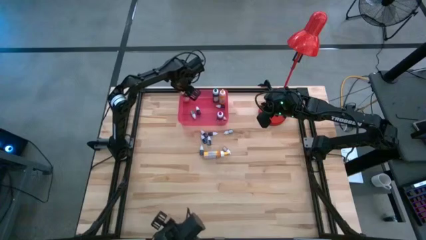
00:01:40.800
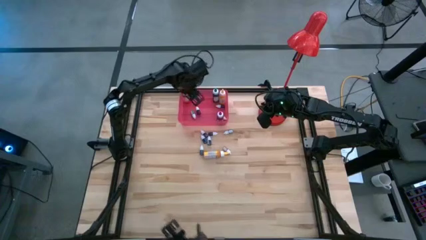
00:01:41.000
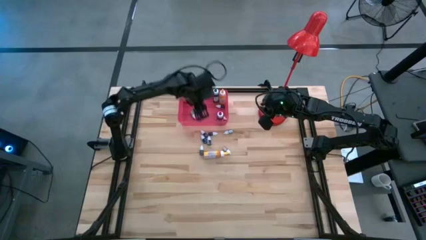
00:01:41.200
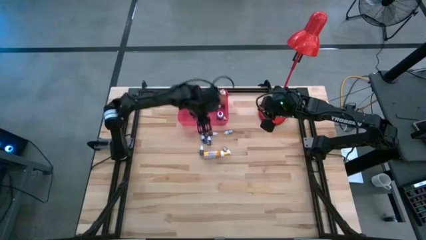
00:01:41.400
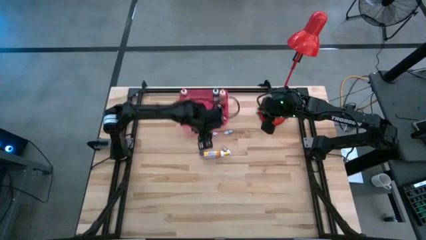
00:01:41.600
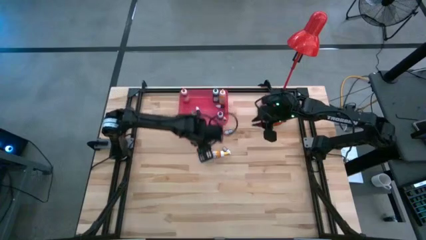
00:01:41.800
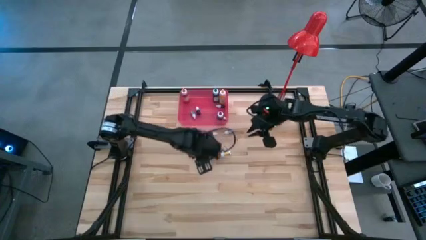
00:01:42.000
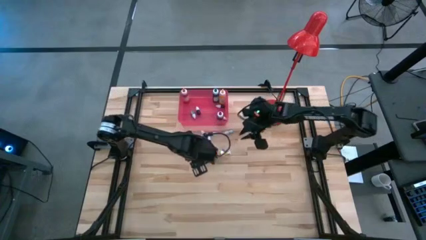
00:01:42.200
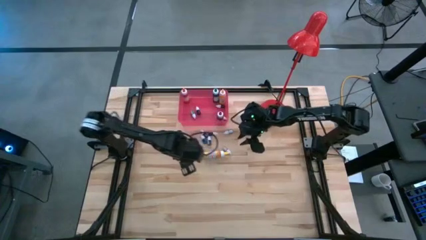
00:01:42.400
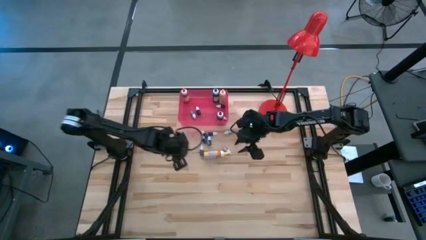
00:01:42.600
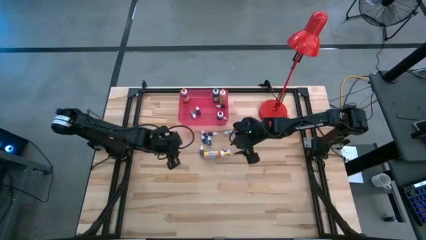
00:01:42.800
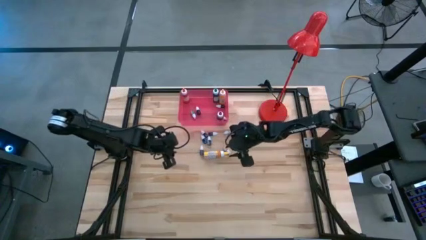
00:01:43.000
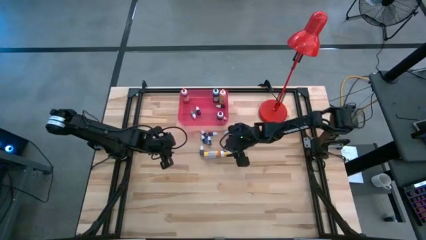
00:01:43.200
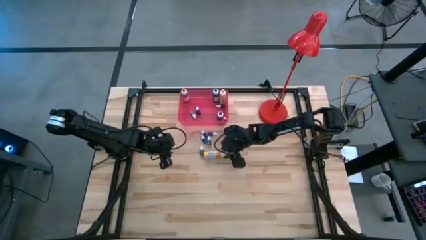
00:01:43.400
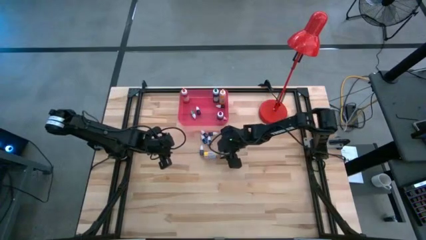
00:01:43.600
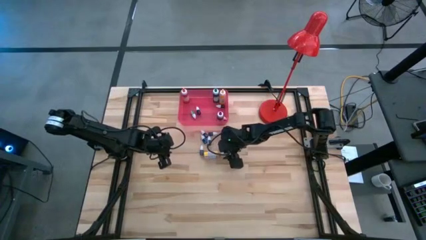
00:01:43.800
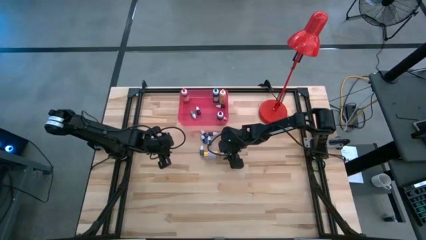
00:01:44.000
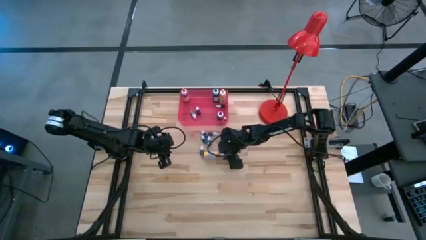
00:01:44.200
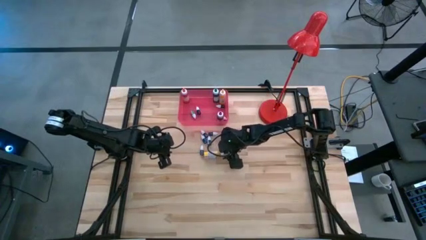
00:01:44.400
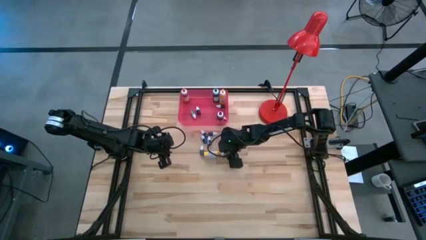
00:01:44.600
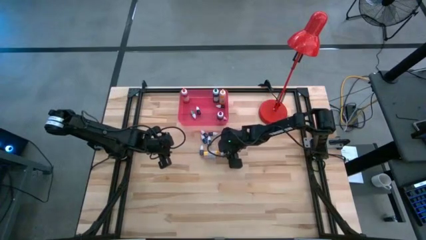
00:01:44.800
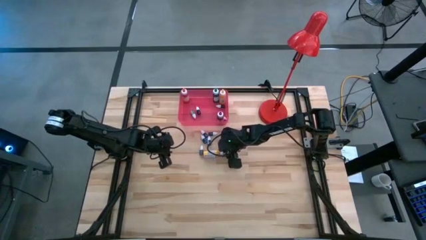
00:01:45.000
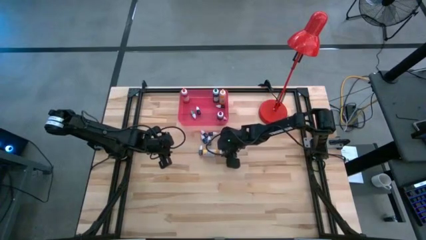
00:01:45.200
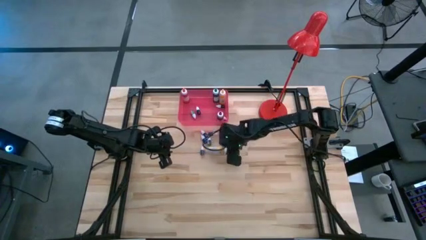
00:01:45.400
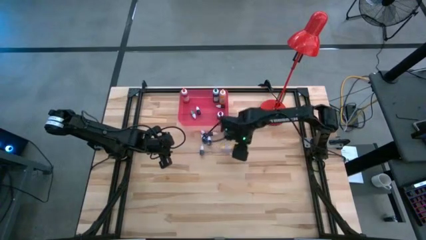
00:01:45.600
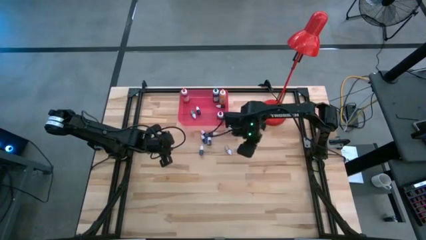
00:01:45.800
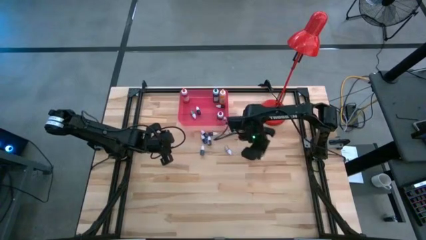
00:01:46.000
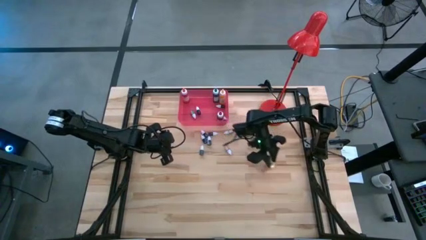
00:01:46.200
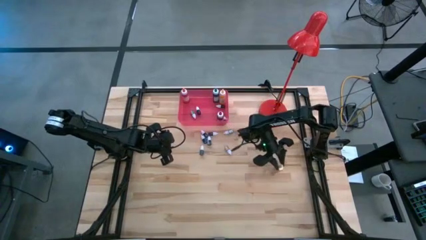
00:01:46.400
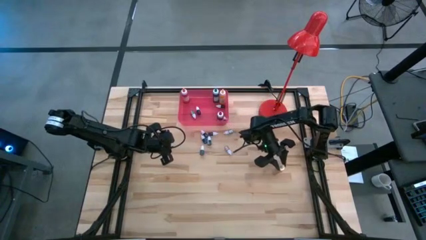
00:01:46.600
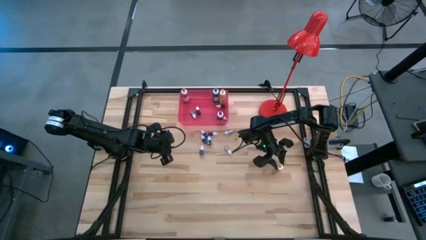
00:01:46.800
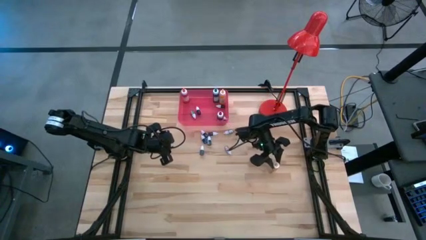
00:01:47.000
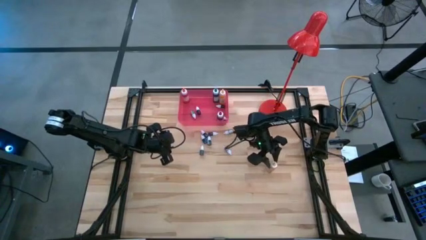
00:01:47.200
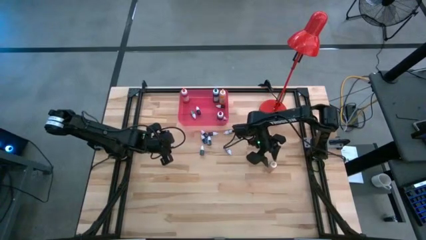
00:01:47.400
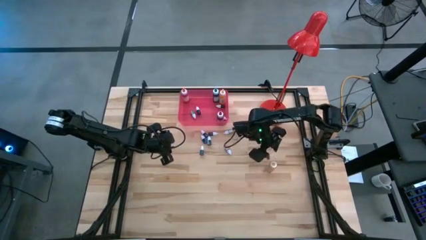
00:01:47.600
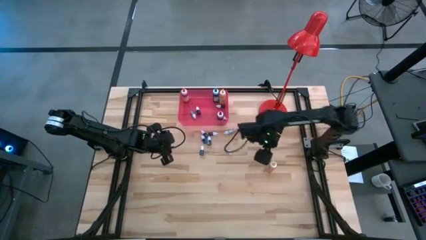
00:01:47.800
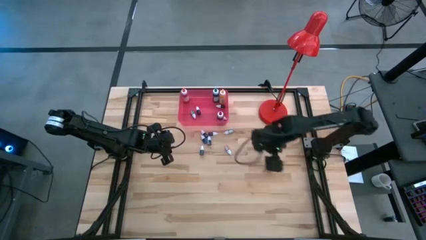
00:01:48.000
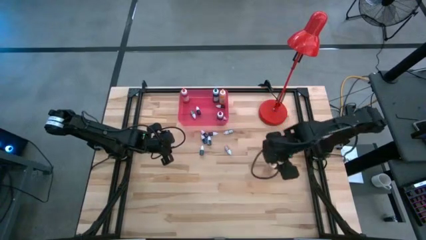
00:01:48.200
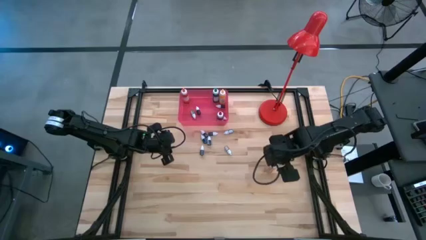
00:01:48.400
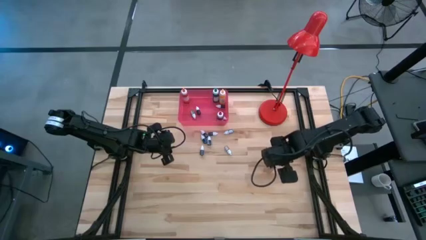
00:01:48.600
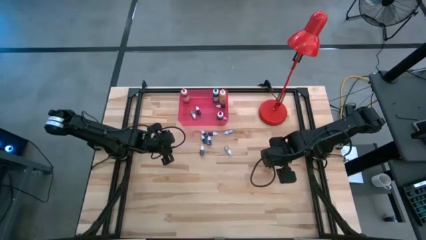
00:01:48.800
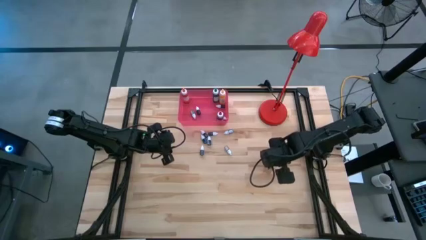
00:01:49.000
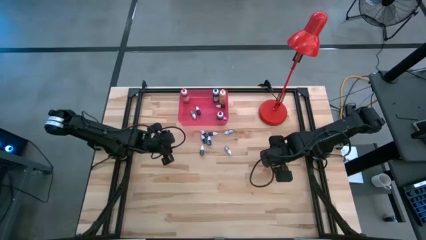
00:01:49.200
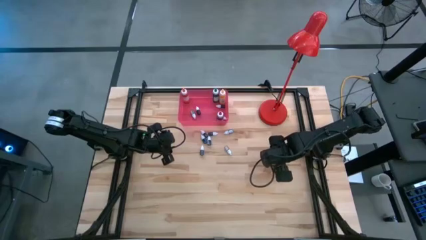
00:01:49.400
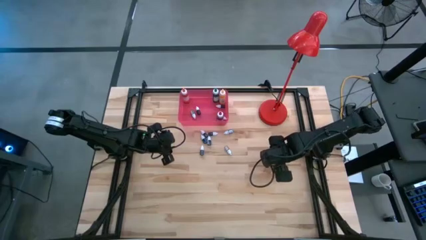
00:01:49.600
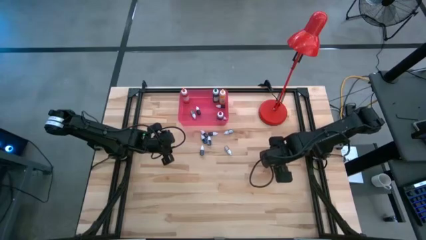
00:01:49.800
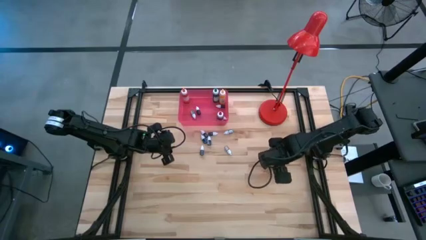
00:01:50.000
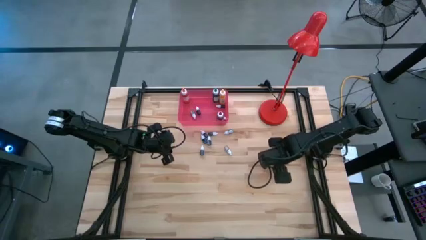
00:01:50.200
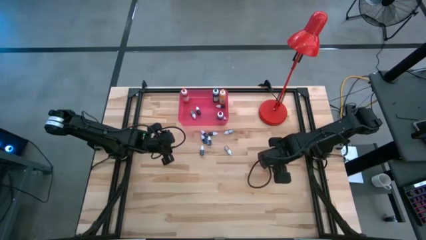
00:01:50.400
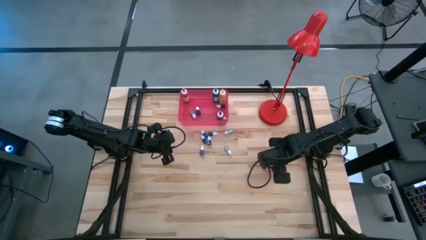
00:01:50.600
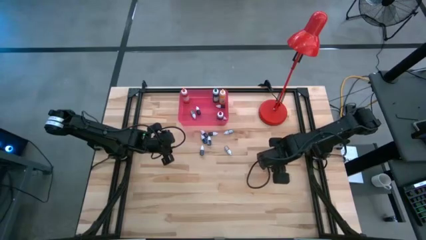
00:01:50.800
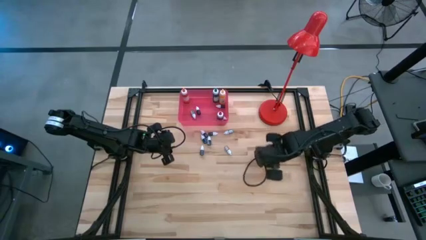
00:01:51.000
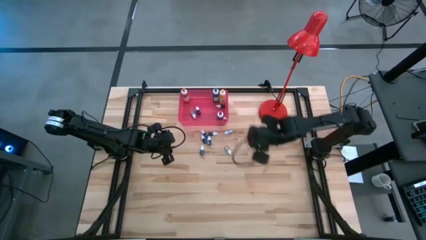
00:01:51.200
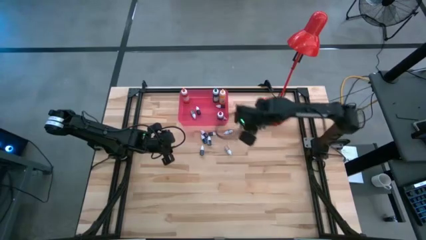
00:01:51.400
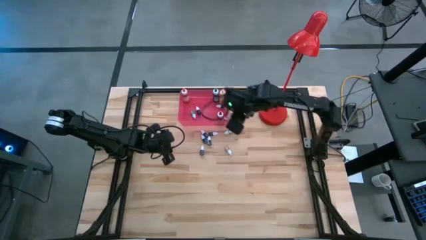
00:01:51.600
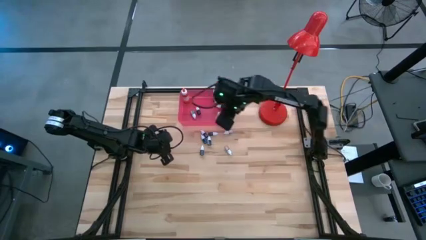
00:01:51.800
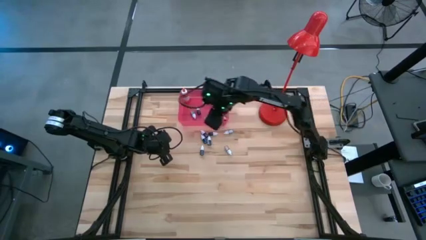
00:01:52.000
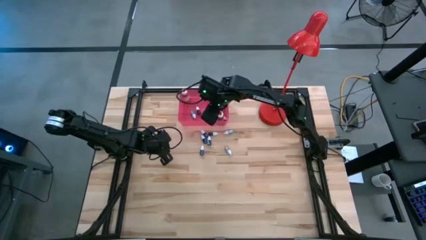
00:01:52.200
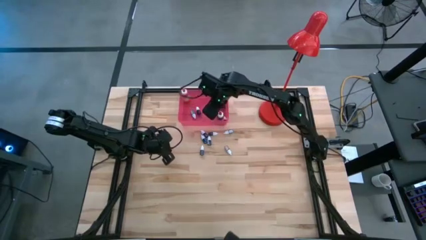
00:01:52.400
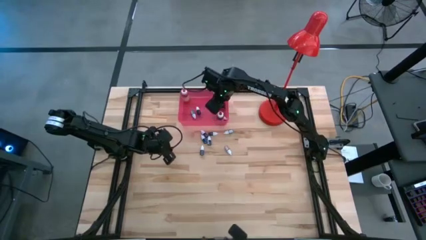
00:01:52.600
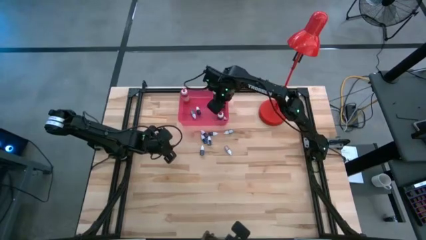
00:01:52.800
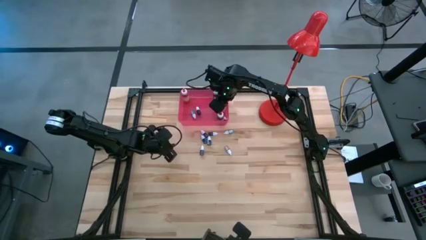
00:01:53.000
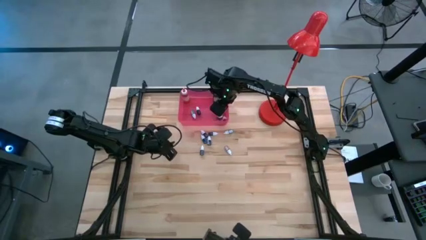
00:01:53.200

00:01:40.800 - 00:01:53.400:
Task: Pick & Place food coloring
Put the big yellow food coloring bottle into the red bin

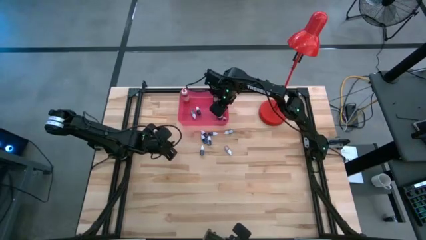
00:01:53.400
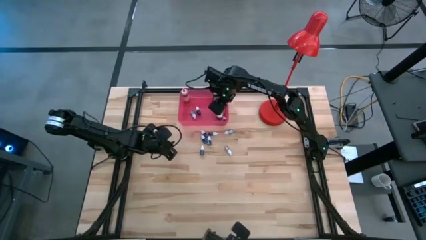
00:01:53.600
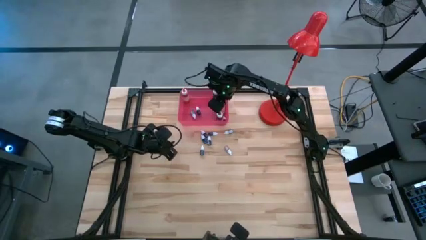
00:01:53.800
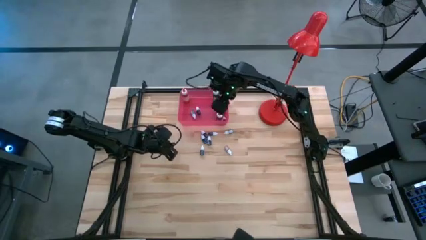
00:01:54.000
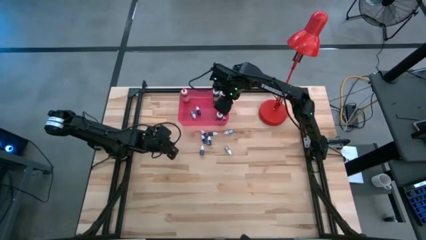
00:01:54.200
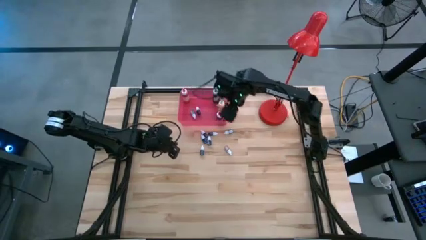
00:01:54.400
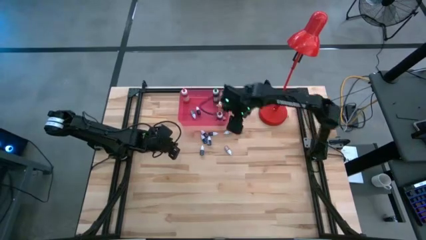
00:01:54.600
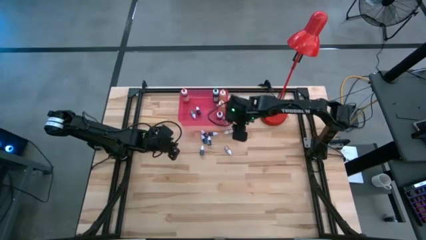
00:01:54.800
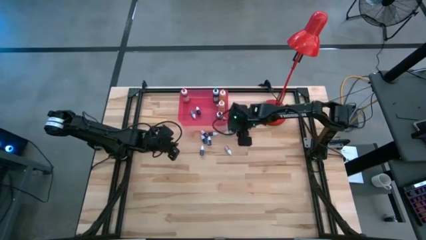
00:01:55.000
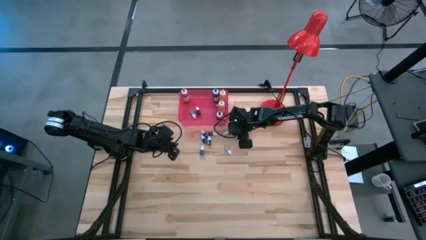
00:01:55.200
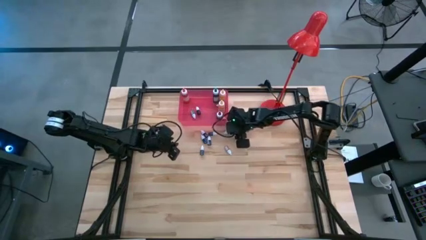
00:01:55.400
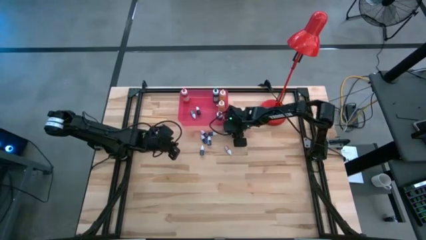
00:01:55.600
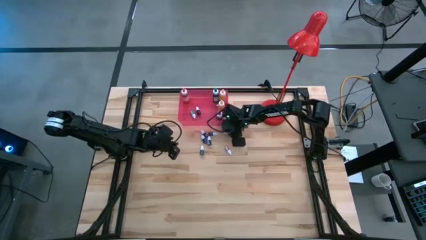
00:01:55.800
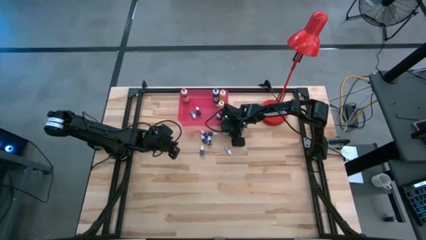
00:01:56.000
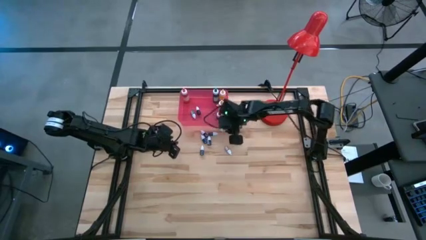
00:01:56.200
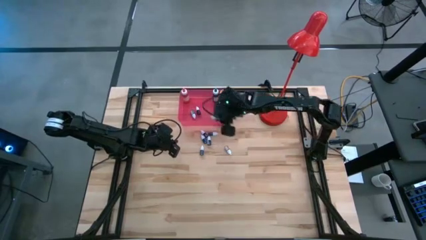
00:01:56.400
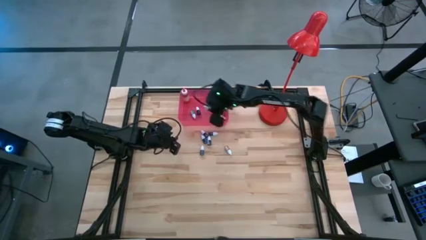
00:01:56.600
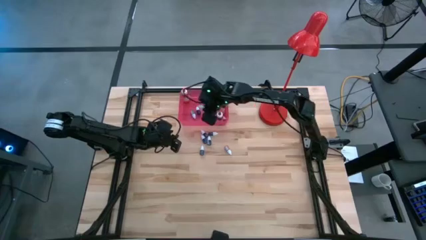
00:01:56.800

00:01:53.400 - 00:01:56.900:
Put the small black food coloring bottle into the red bin

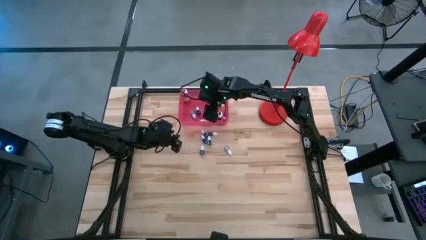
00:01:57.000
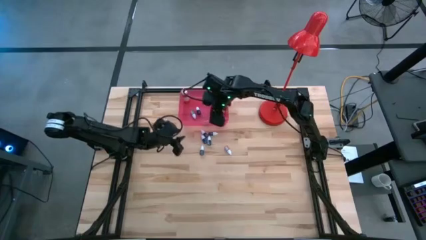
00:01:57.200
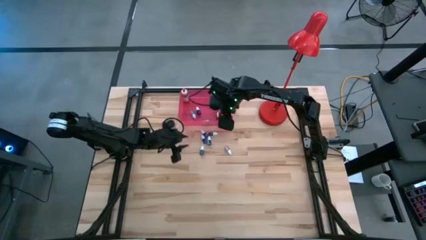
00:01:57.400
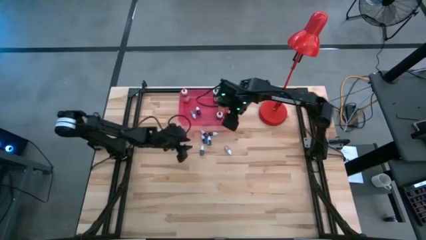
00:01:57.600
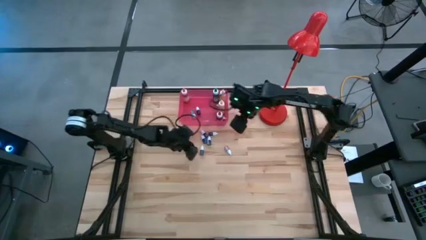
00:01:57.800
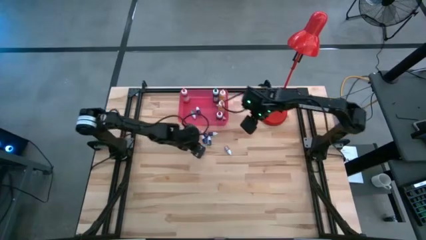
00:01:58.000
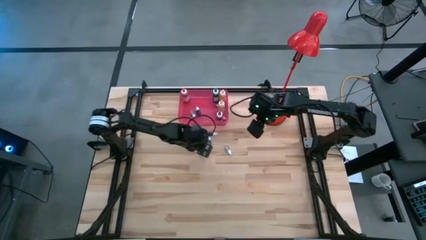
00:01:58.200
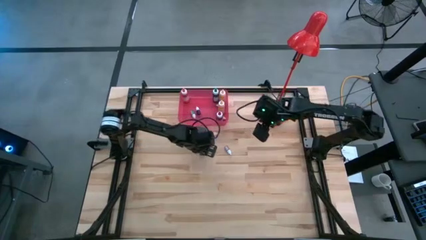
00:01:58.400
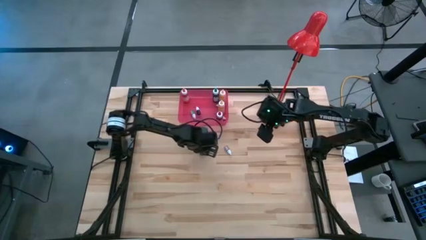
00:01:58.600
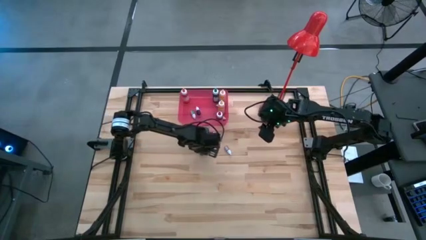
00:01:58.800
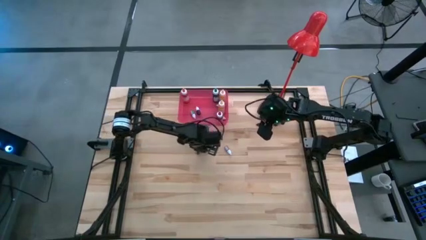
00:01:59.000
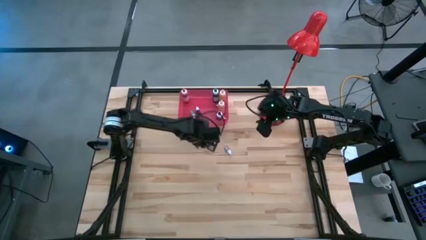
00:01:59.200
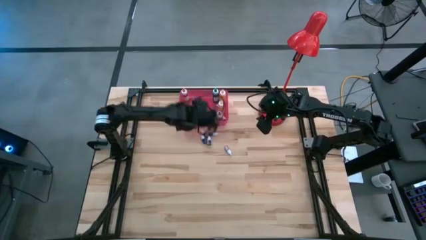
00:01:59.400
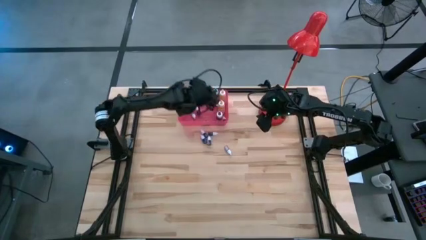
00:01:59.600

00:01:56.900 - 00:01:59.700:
Put the small blue food coloring bottle into the red bin
